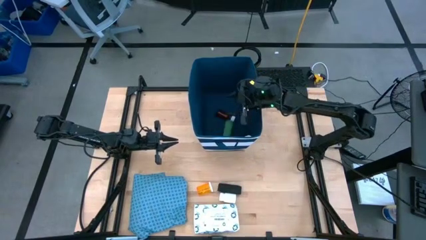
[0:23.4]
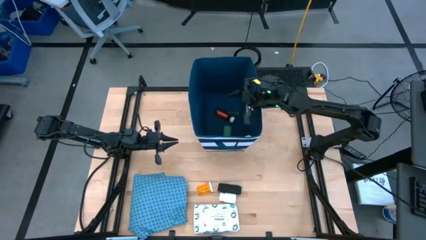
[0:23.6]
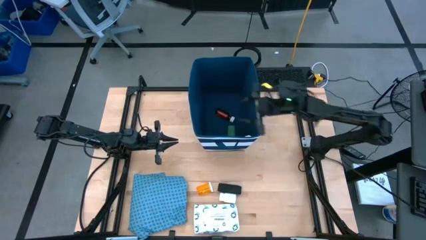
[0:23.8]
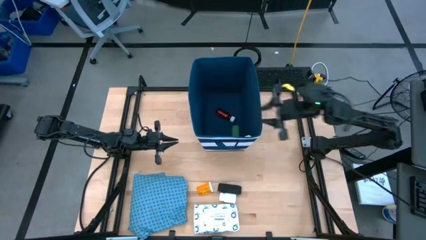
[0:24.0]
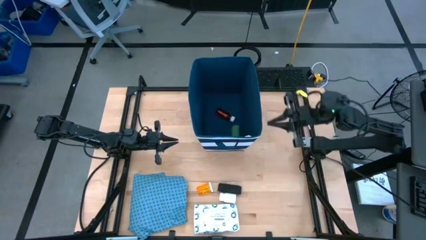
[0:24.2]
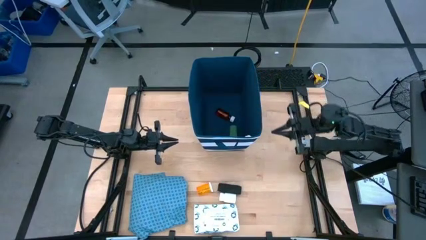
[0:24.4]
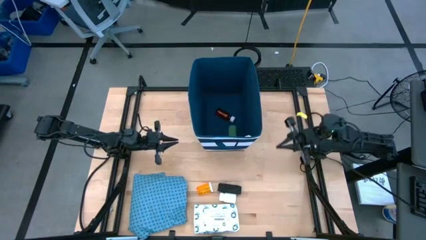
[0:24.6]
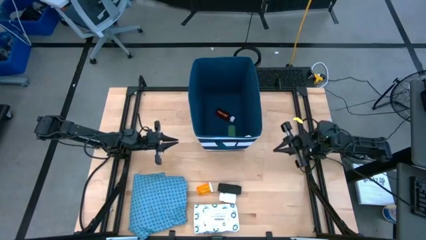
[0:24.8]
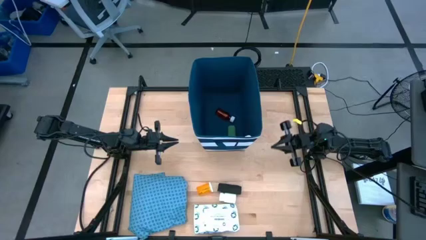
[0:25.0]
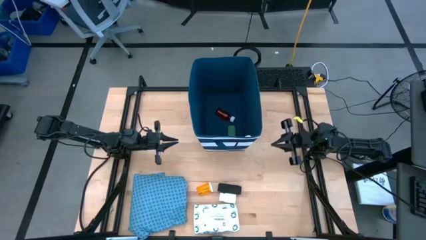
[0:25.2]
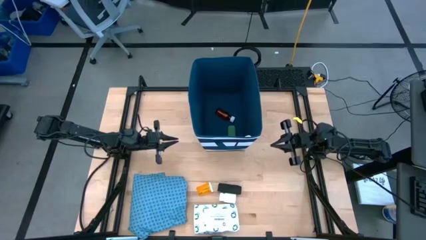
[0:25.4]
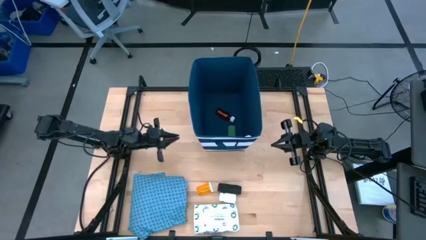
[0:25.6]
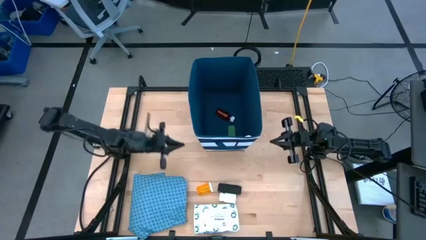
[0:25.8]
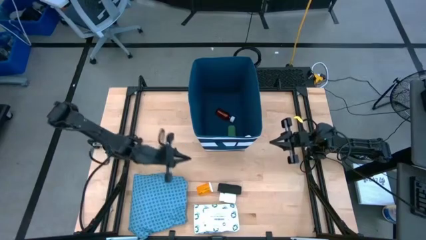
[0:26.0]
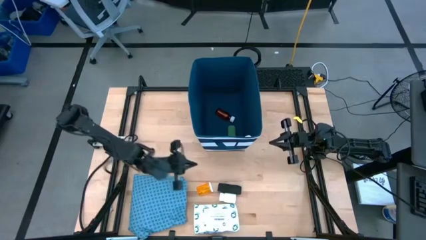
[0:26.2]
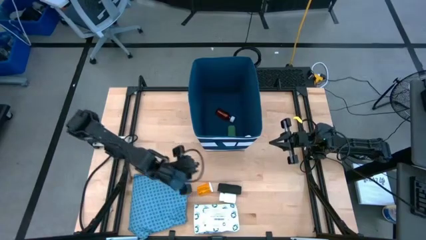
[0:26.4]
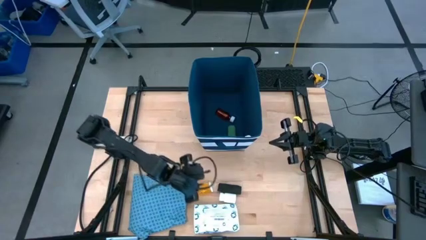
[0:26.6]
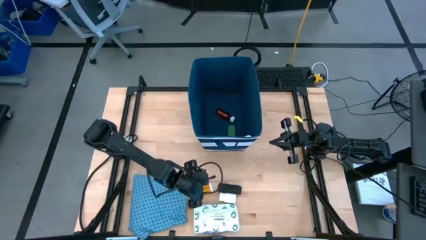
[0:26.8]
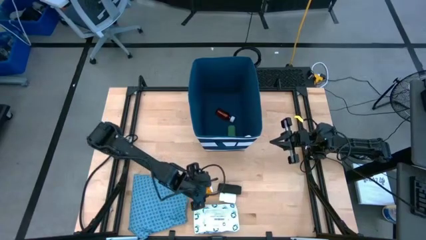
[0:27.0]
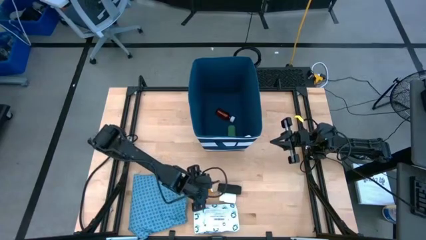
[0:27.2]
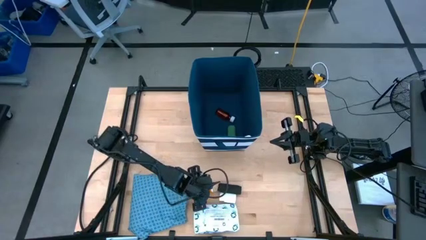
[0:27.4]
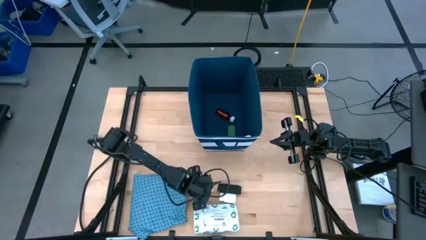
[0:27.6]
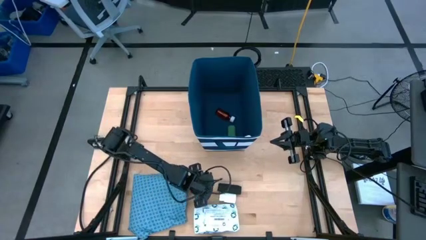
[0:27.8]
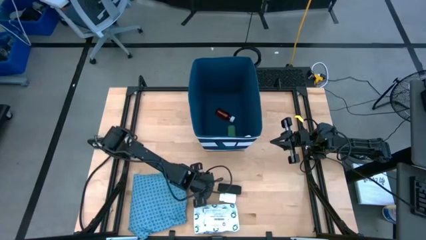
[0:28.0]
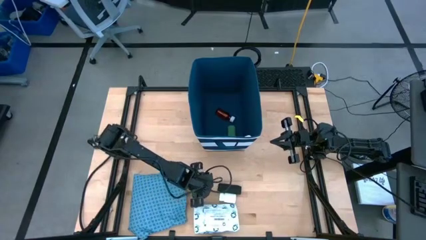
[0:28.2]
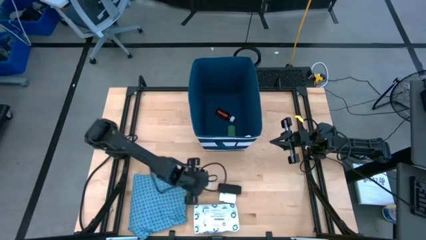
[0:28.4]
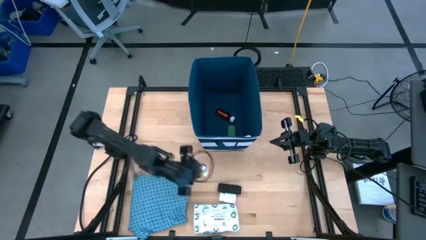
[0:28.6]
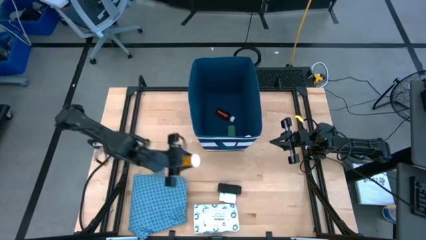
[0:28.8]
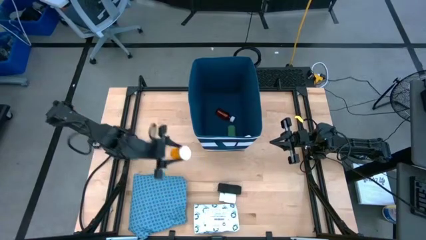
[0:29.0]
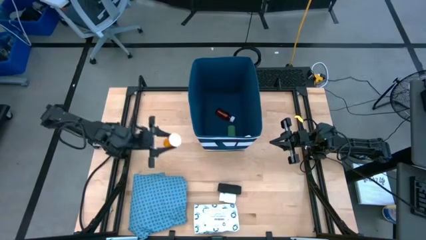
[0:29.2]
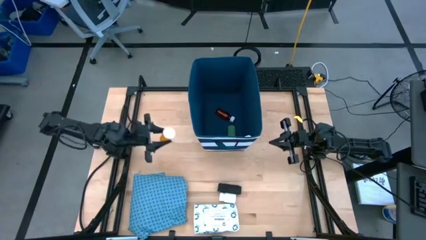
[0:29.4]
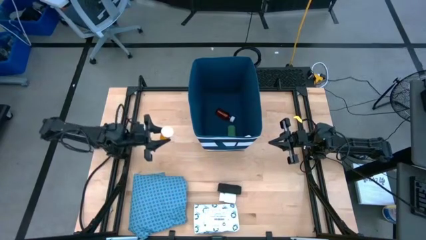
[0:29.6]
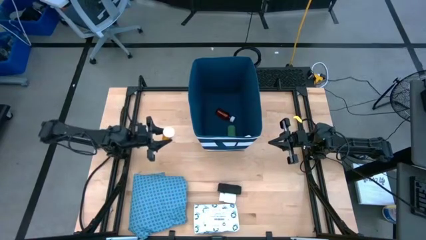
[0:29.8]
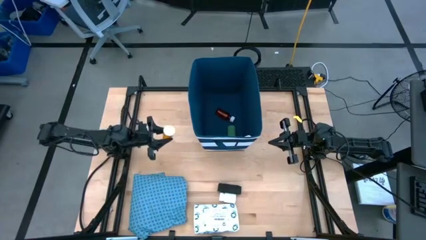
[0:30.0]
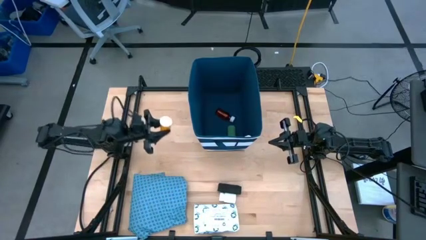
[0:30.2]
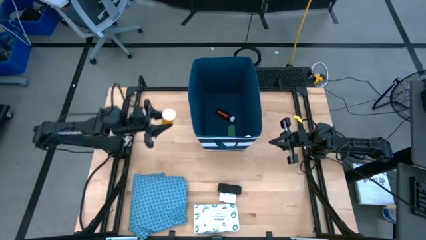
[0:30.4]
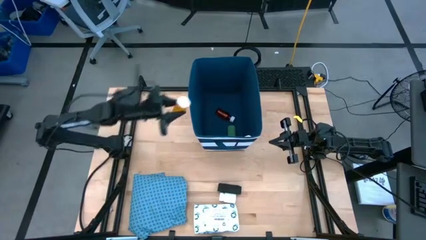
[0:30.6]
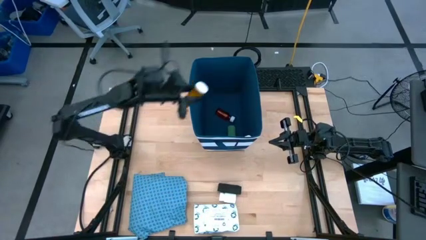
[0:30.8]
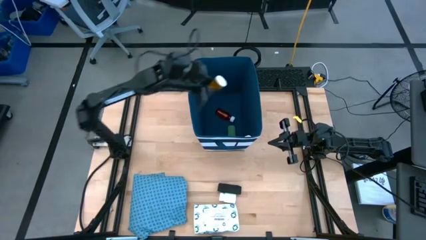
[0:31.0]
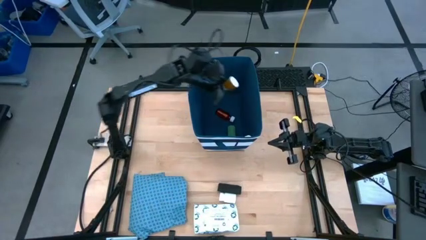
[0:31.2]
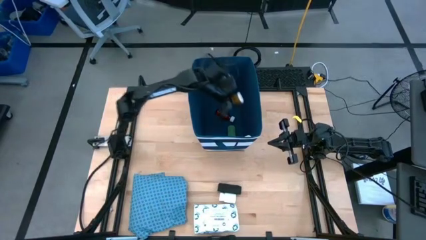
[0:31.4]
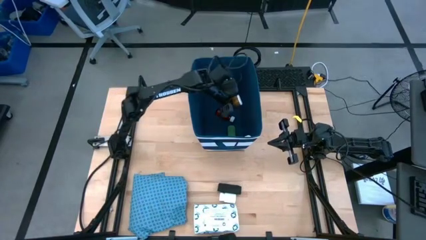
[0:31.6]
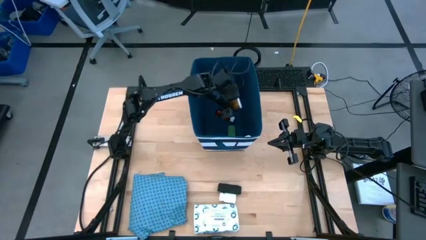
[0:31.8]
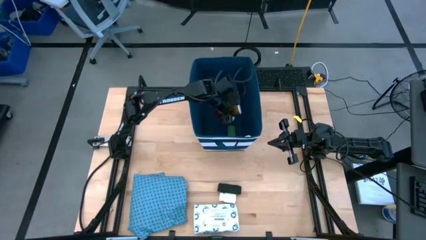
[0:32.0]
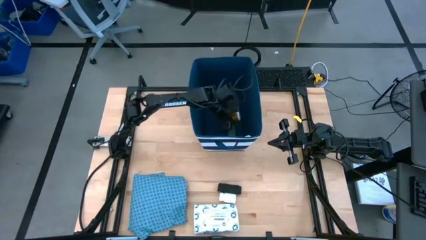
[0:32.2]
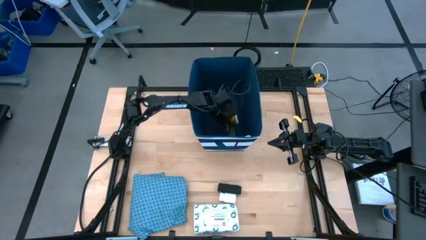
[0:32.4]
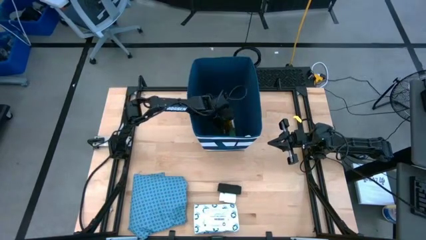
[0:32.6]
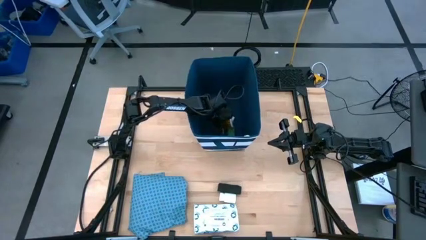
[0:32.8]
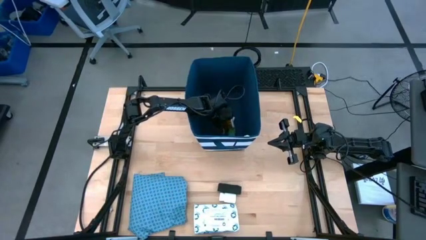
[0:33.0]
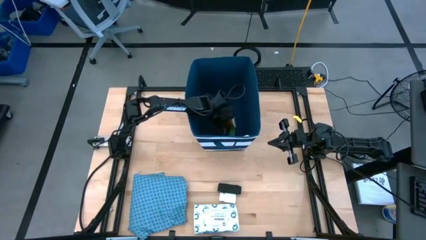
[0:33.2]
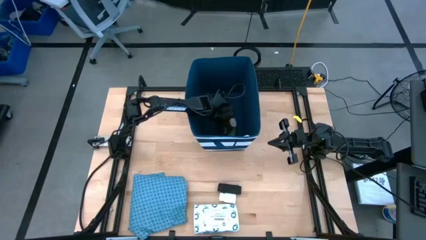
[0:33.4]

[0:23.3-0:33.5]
Task: Pick & place medical supplies in basket/bin
Put the yellow medicine bottle into the basket

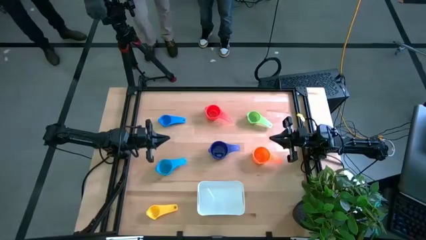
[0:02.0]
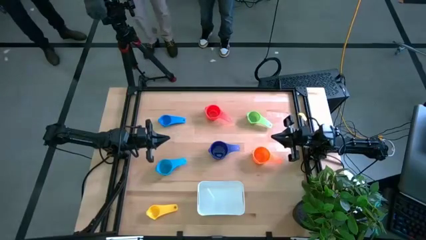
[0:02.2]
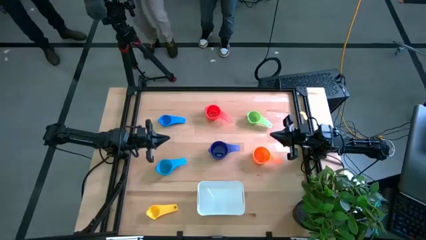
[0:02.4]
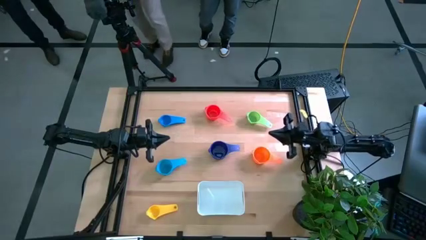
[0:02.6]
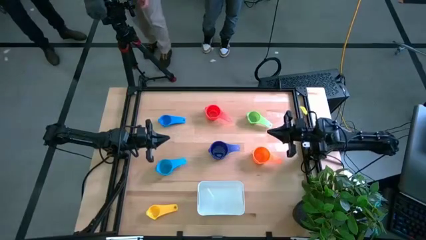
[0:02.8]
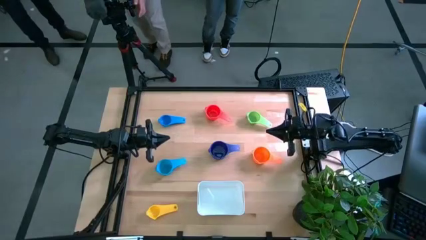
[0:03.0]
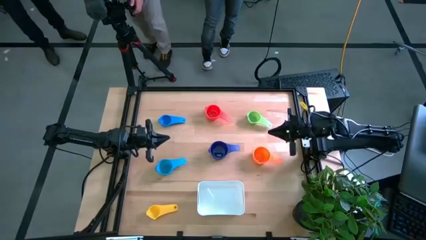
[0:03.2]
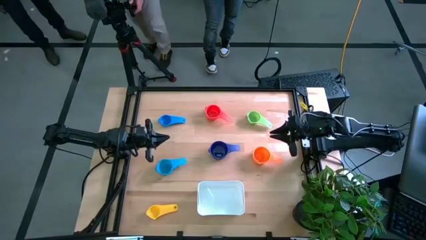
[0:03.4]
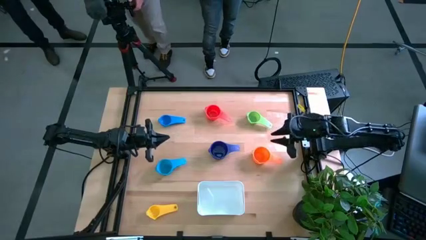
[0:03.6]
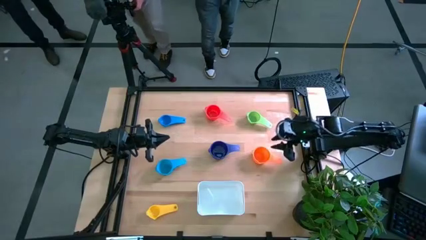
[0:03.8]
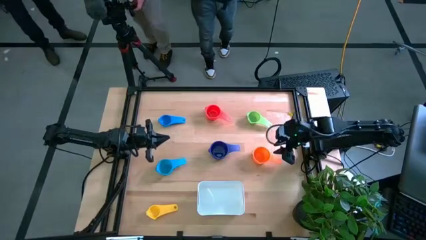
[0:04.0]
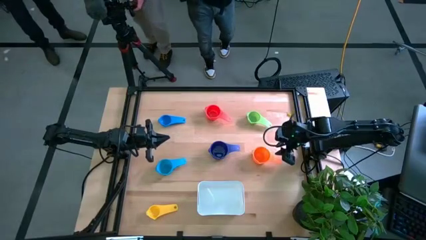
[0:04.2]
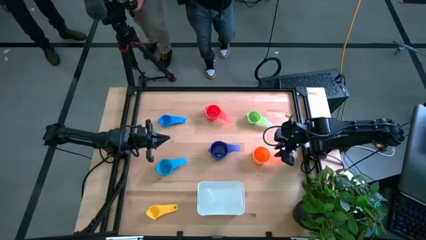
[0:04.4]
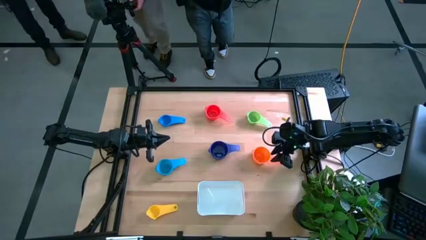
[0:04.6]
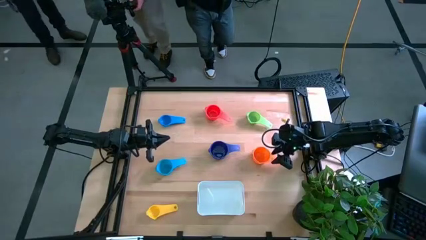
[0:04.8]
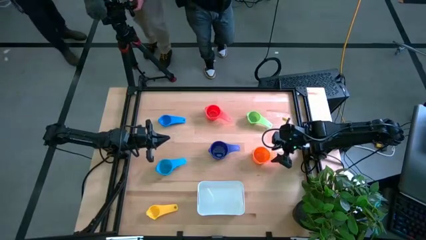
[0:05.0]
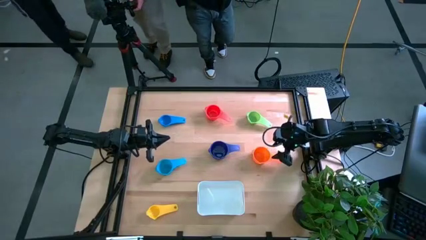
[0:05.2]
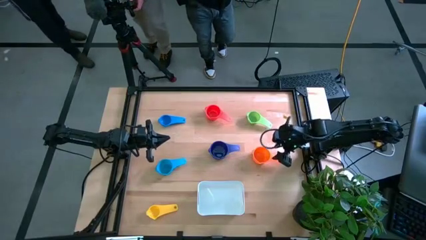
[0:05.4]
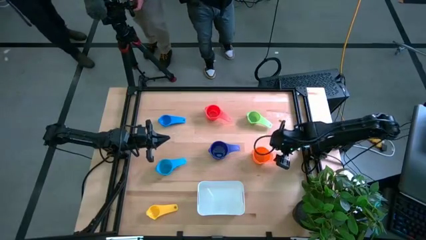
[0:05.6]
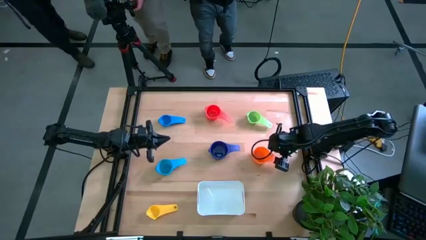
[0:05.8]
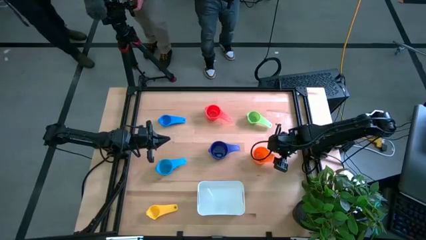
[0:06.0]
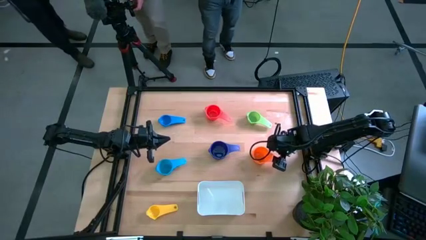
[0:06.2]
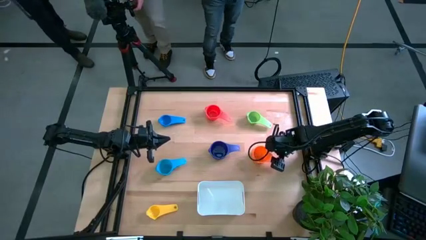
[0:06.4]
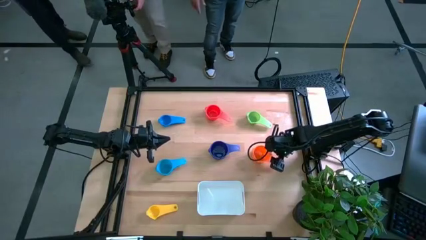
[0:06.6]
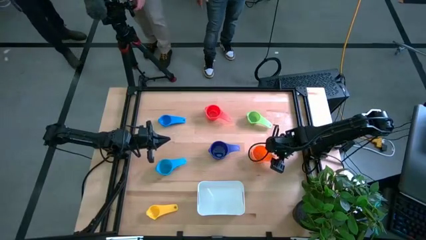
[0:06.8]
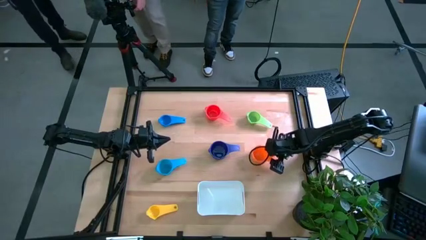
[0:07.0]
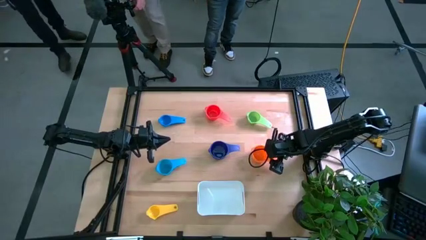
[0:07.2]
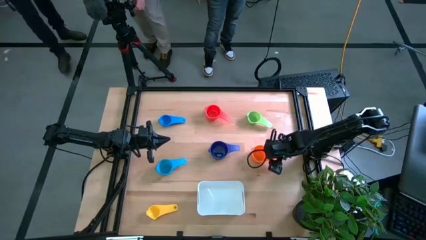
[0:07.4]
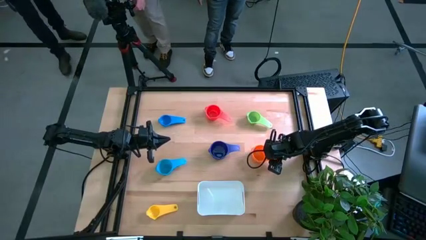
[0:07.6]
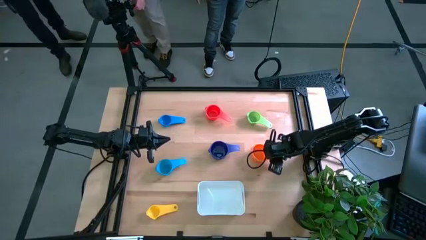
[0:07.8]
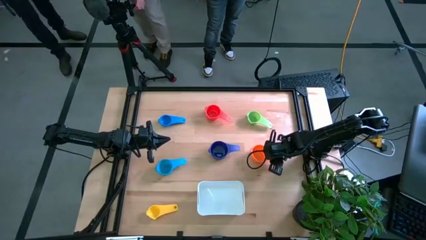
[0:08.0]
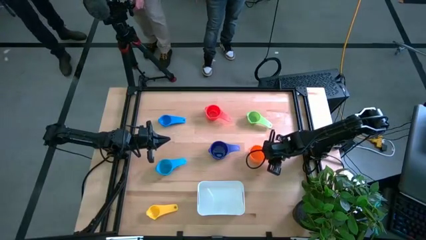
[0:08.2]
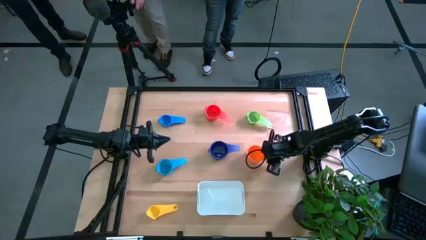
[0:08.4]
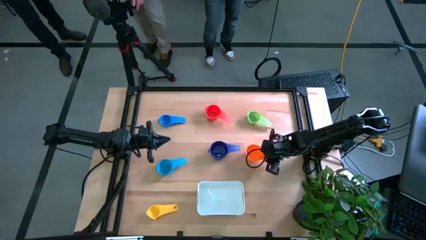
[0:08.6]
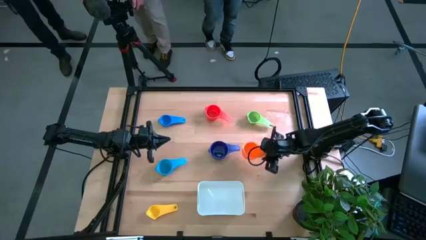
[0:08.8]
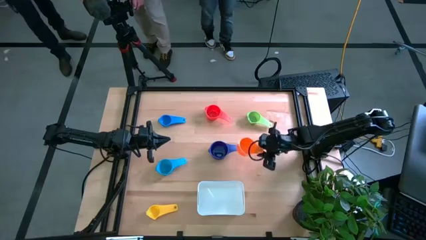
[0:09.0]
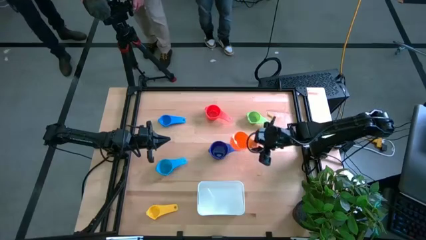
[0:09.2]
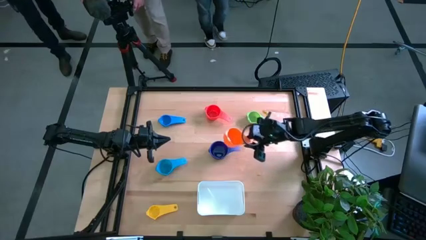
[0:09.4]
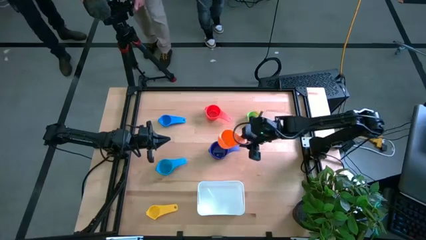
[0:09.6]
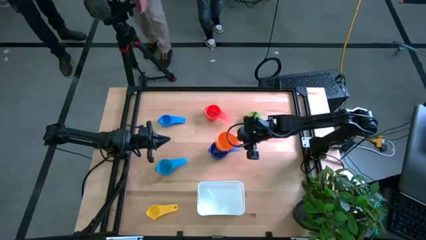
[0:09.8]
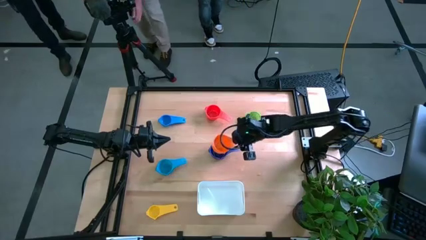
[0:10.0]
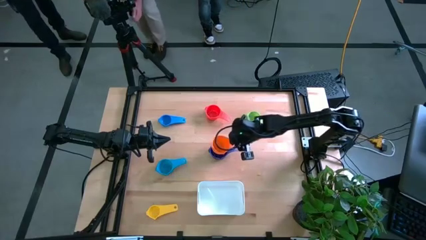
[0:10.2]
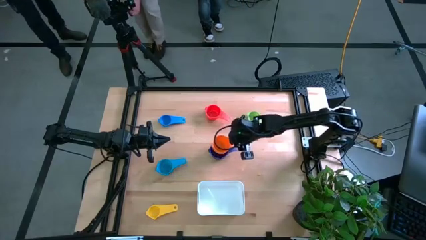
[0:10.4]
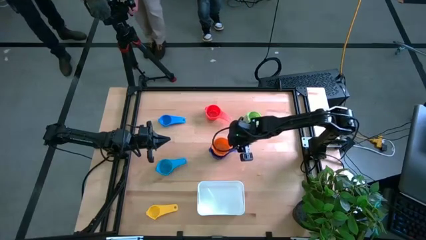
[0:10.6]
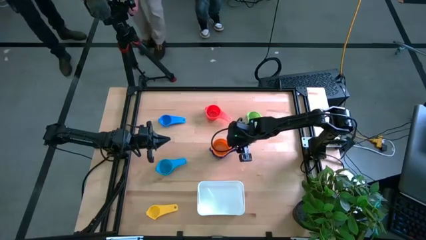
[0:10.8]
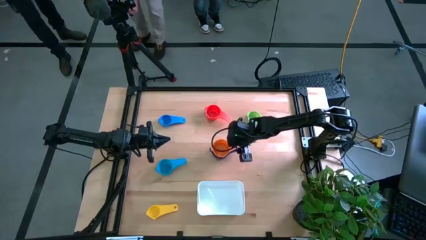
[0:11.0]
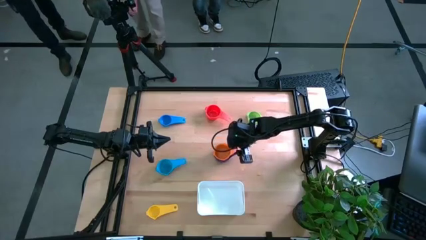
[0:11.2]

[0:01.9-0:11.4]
Task: Nest measuring cups in basket
Stack the orange measuring cup on the dark blue measuring cup
